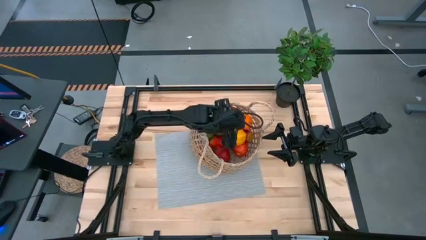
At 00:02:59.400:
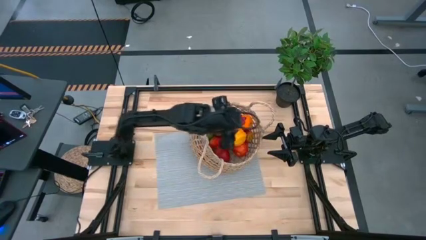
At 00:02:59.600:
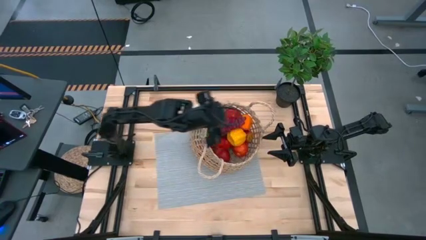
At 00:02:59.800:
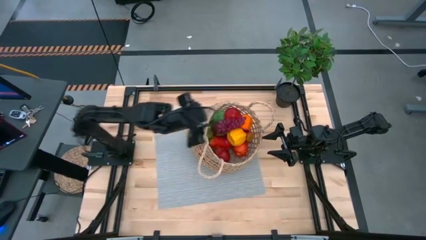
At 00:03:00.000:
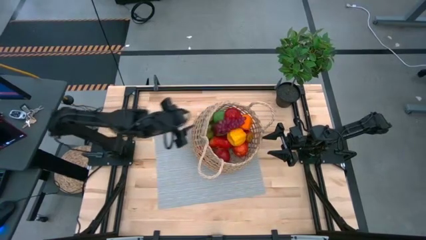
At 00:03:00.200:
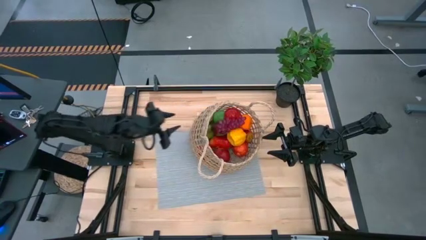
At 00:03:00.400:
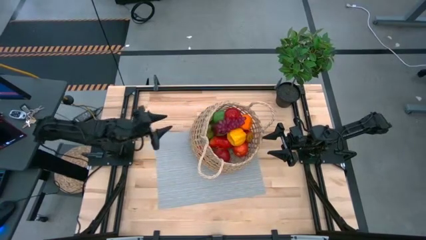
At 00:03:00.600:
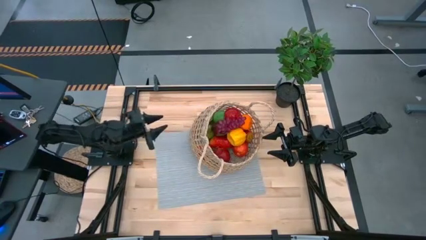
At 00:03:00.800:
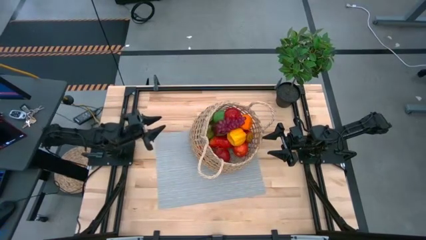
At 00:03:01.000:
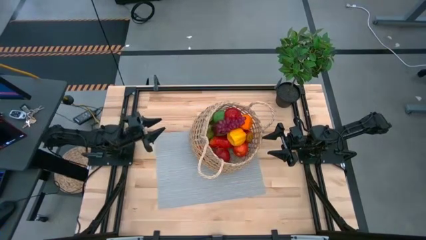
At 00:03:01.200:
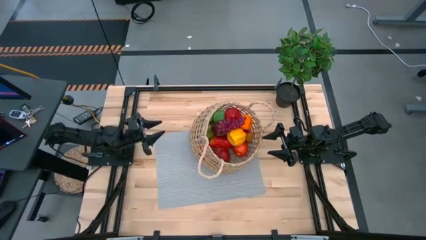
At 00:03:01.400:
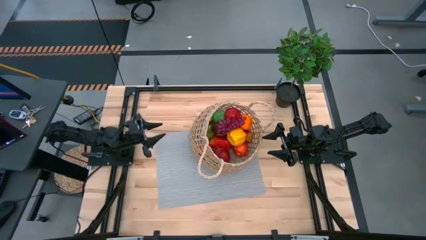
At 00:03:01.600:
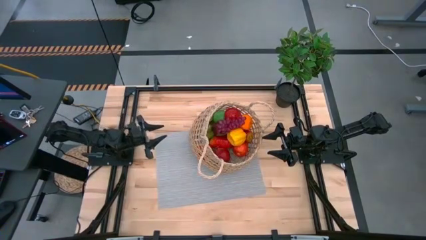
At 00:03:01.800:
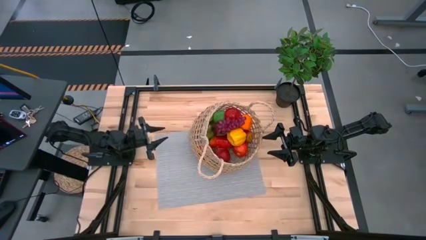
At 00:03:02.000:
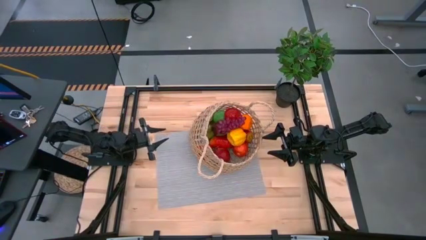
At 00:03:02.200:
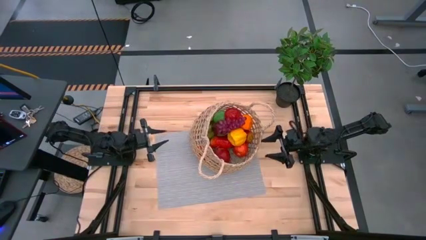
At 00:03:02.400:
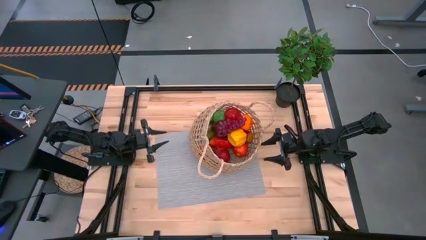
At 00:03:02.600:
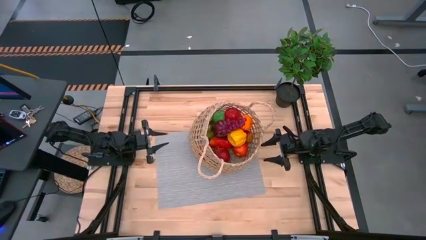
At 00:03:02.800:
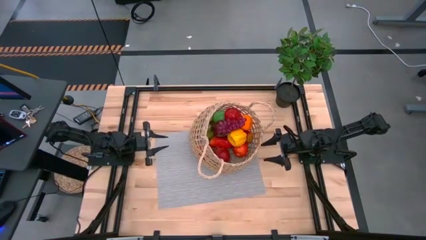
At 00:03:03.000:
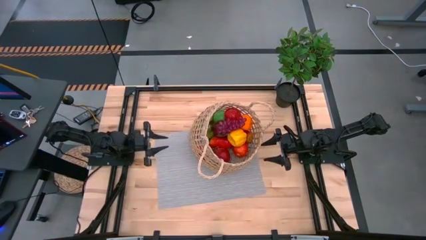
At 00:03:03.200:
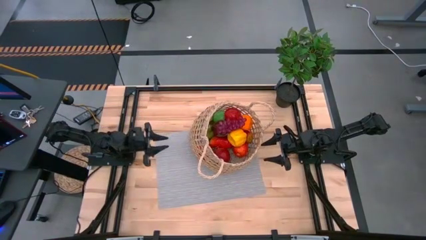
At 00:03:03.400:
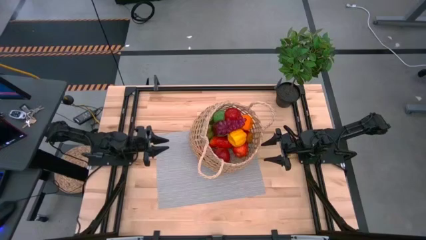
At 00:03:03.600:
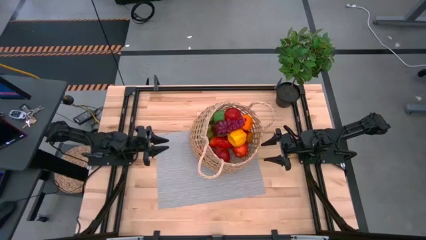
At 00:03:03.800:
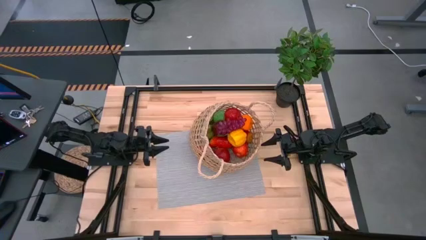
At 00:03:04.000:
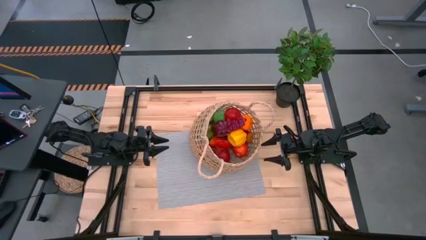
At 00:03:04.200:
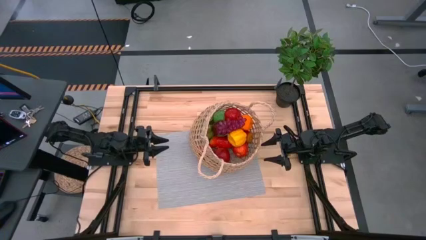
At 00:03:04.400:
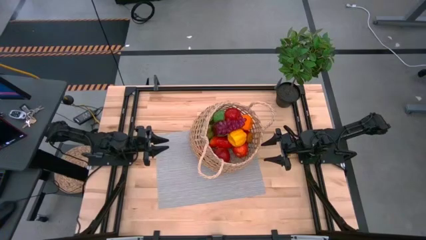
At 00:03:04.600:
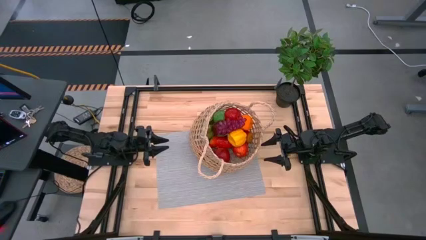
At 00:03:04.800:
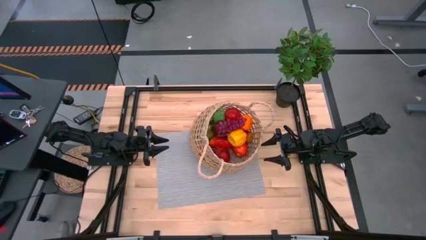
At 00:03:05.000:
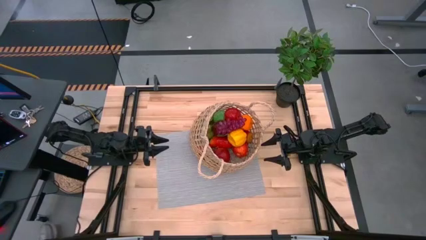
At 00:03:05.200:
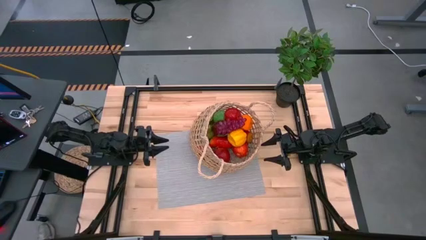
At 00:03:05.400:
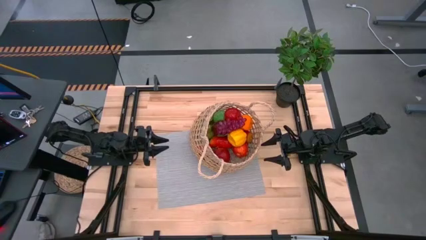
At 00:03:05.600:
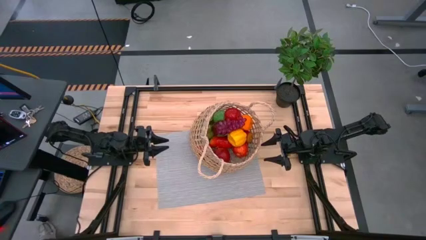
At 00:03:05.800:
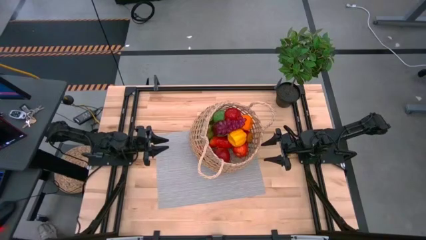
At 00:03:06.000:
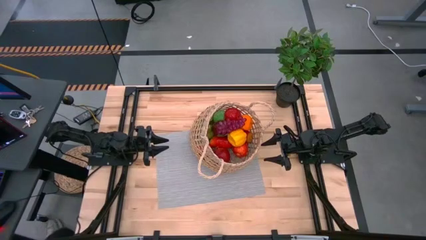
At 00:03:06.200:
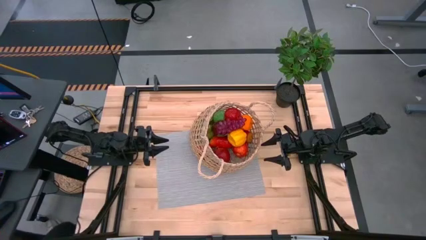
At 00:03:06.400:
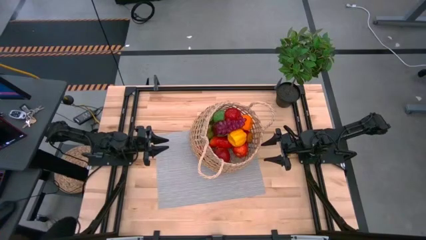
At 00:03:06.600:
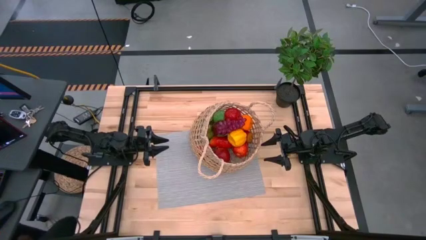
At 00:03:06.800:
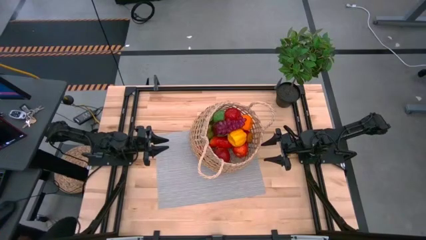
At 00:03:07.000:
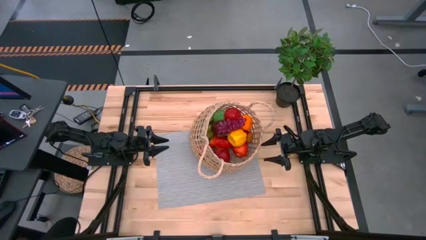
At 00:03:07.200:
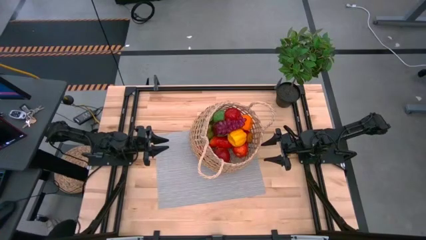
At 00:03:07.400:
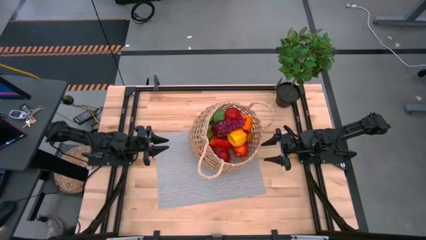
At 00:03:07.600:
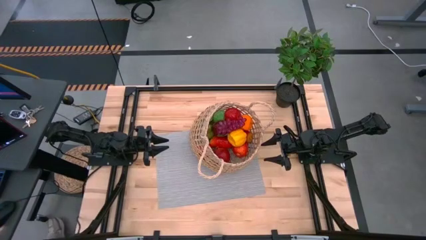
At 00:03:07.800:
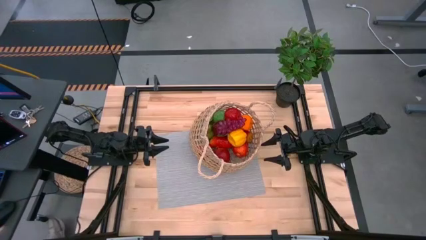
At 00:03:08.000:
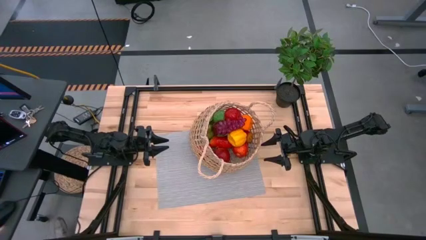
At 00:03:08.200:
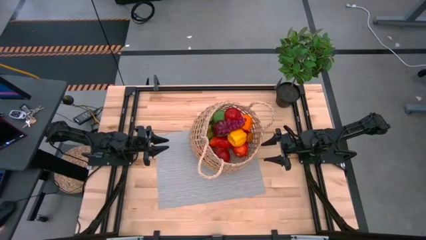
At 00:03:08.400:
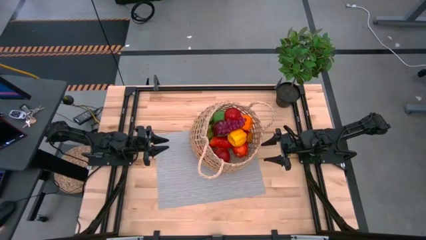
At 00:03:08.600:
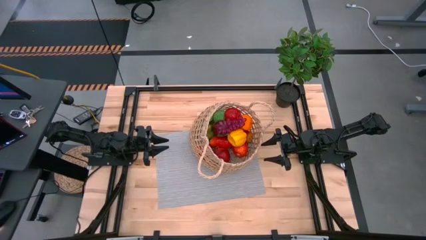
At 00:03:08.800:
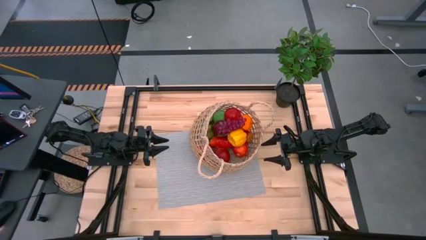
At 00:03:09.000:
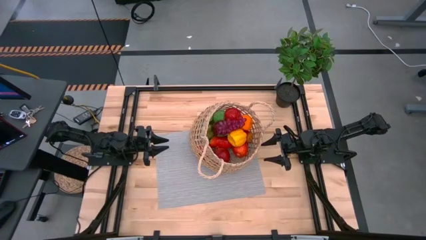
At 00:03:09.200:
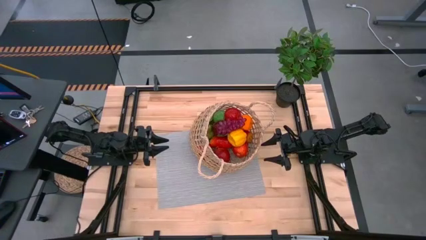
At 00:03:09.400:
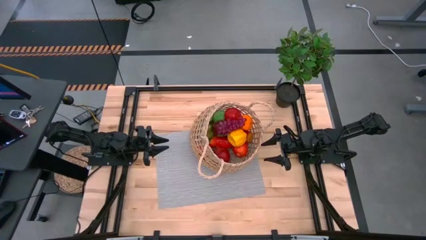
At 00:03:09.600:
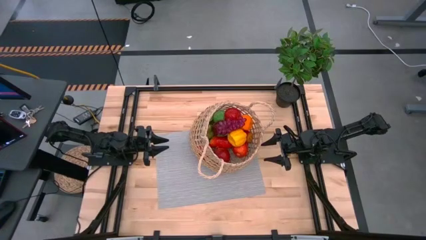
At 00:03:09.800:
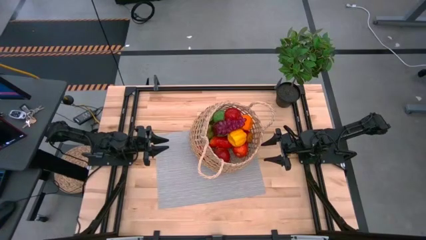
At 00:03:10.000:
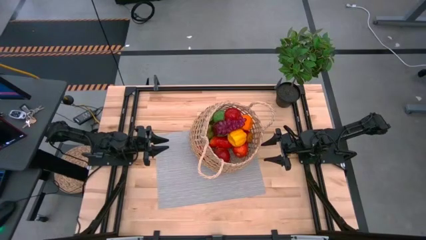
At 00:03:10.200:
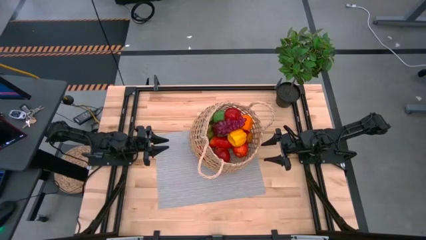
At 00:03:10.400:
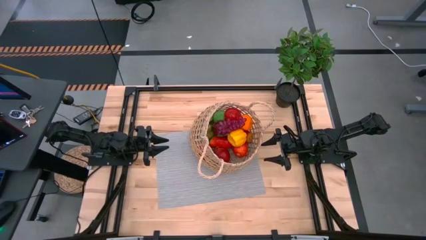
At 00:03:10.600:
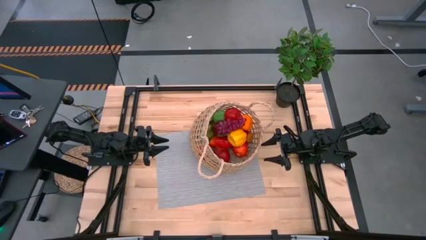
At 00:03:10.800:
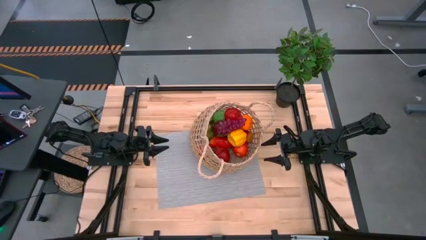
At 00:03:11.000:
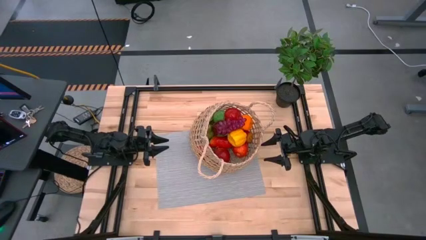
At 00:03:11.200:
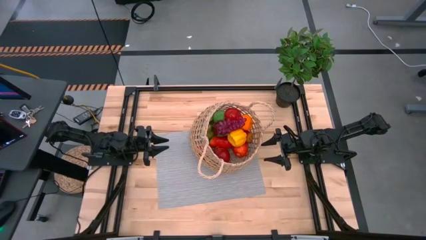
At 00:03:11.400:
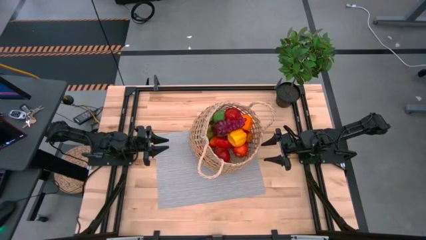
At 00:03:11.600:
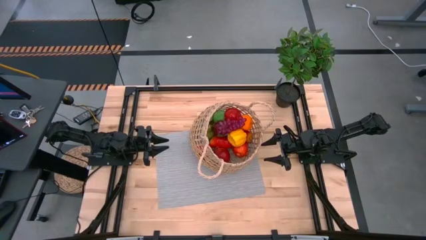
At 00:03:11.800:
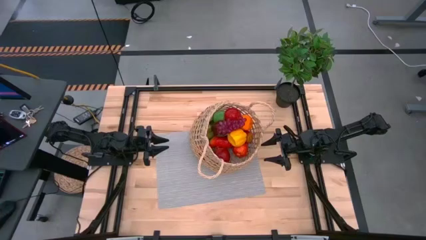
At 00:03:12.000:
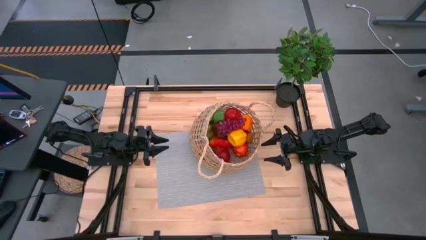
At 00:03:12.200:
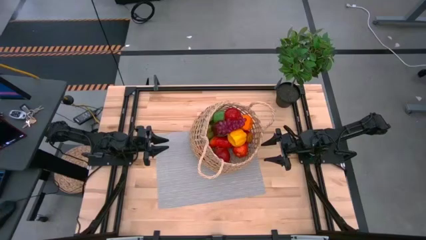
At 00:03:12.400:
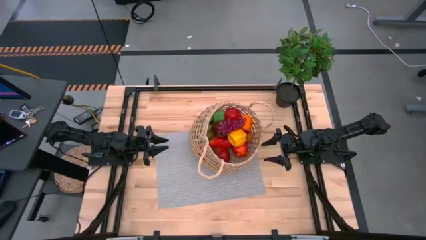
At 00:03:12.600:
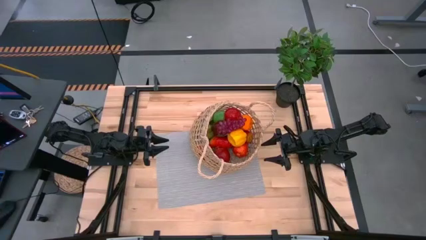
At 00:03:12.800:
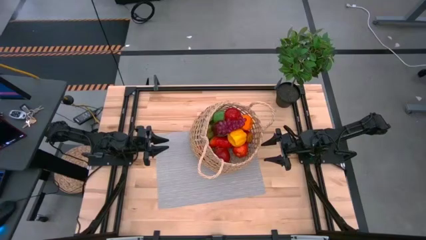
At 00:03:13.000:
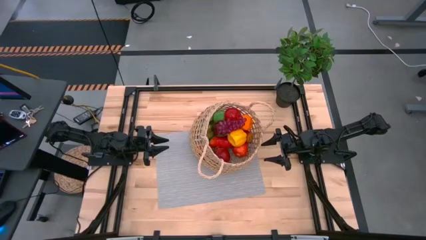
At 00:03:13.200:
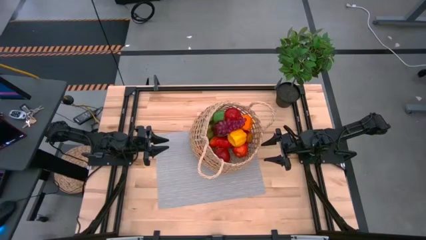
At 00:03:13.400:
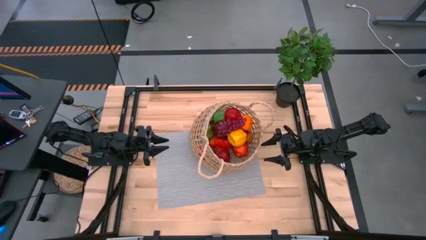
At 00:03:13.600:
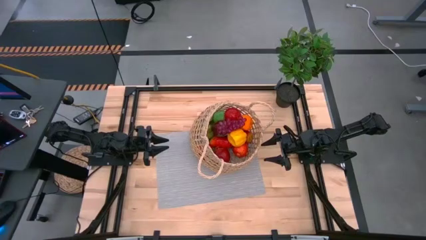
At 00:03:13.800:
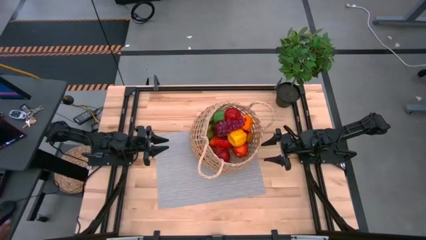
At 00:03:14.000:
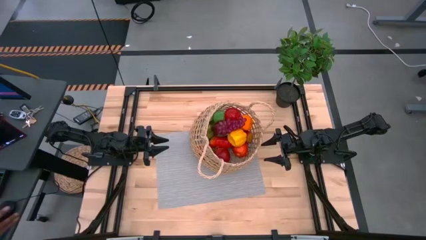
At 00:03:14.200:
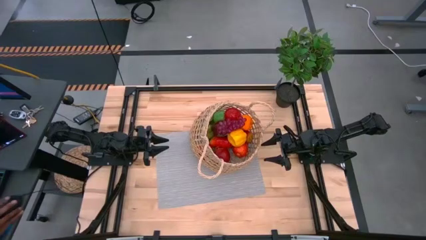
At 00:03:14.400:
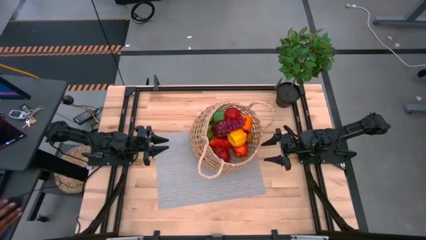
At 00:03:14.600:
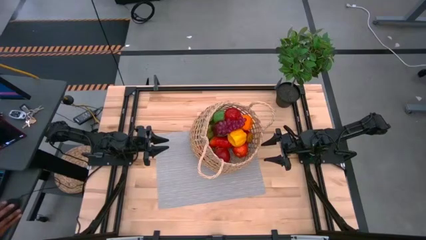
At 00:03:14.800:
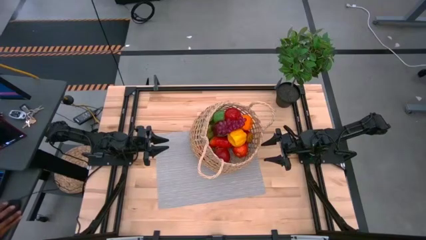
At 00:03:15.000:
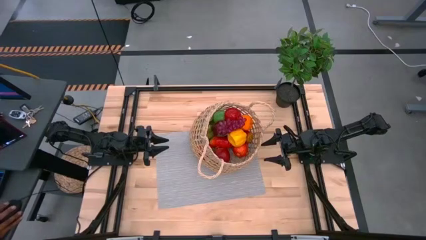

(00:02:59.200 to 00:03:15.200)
Task: Build produce basket
Return to Home Position

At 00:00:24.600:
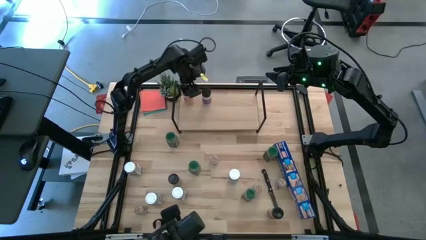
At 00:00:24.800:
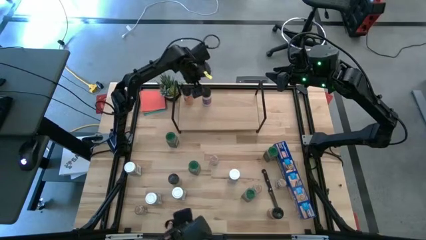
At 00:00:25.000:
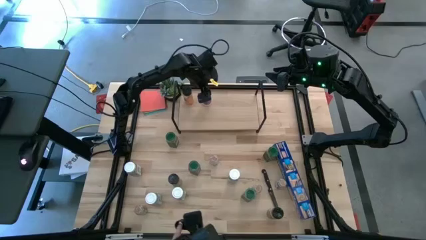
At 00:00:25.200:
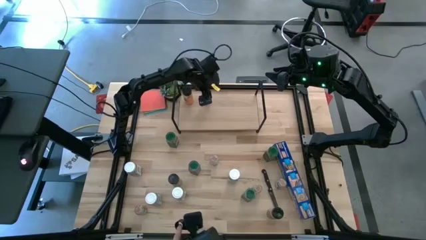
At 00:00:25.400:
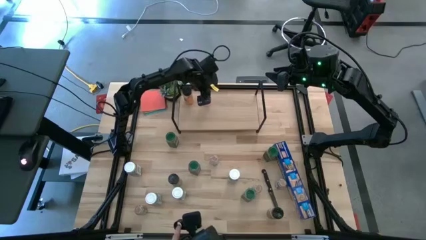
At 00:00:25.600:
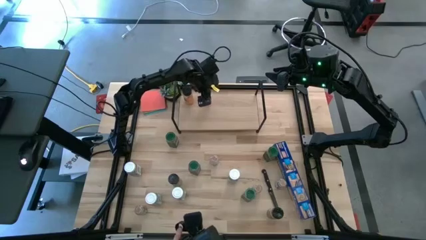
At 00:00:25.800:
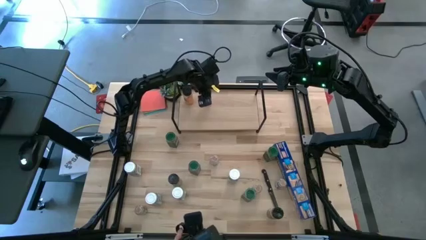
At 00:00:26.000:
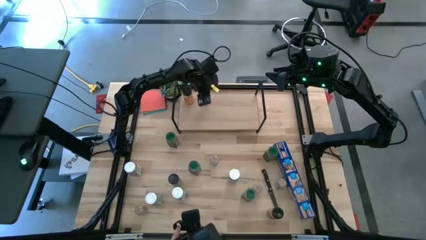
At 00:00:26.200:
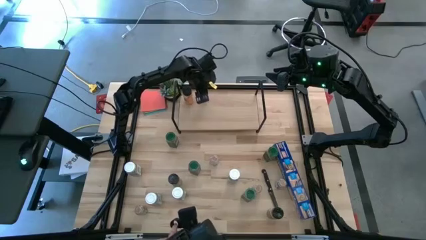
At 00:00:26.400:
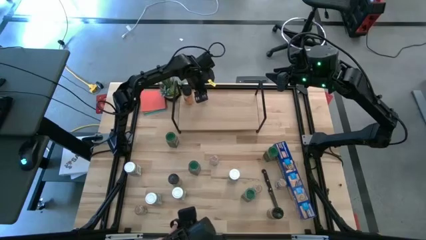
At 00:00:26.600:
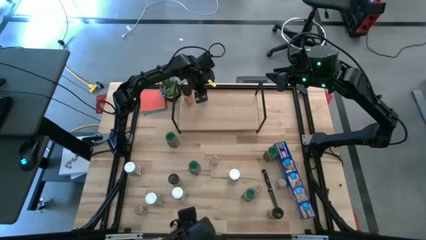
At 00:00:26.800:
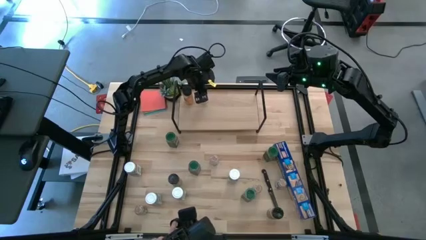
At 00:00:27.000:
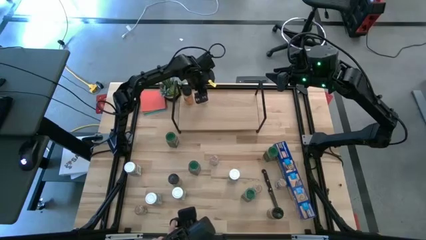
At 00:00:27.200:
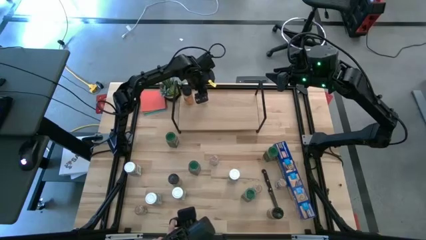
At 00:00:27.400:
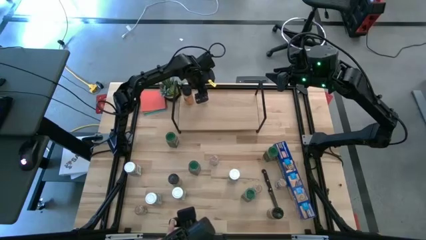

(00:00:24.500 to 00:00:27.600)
Task: Shelf spices
Adjust the right black seasoning bottle on the shelf
